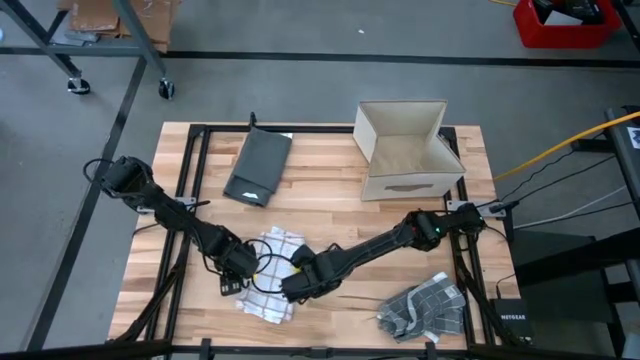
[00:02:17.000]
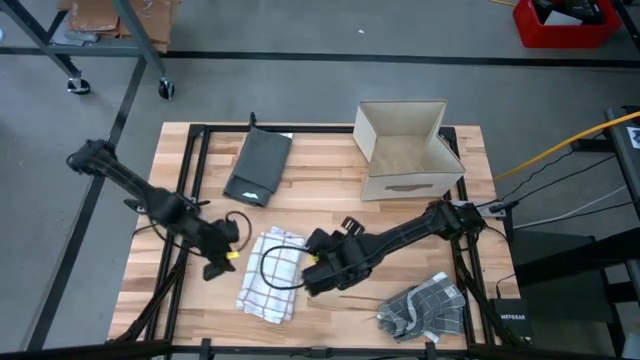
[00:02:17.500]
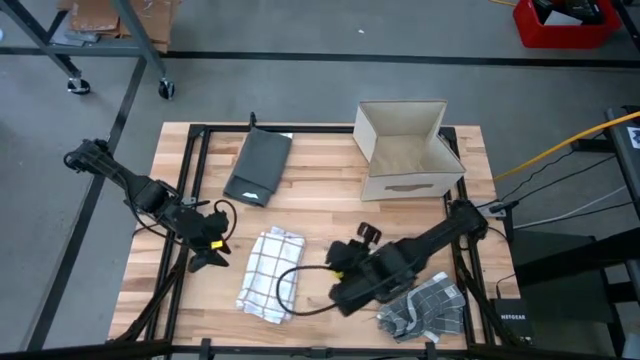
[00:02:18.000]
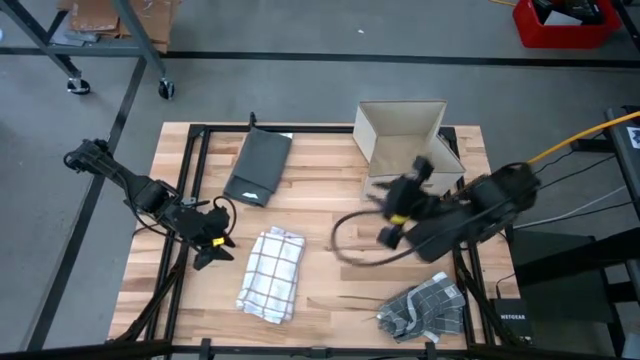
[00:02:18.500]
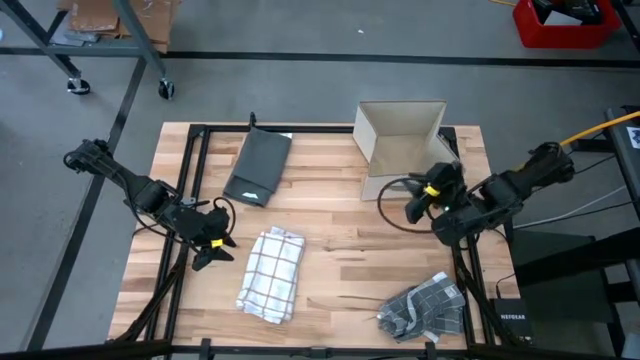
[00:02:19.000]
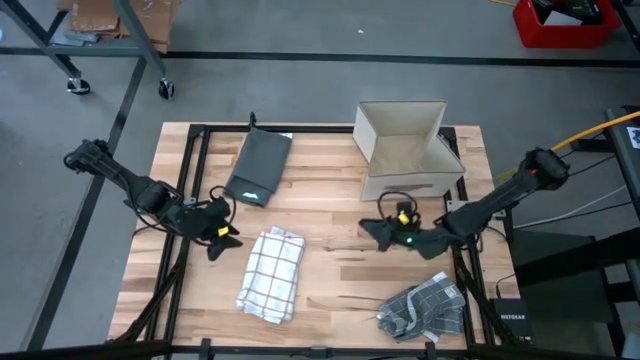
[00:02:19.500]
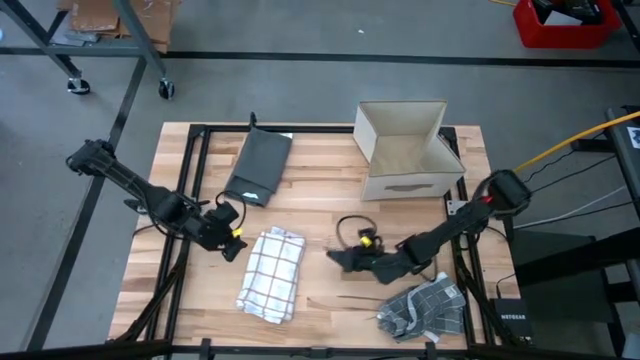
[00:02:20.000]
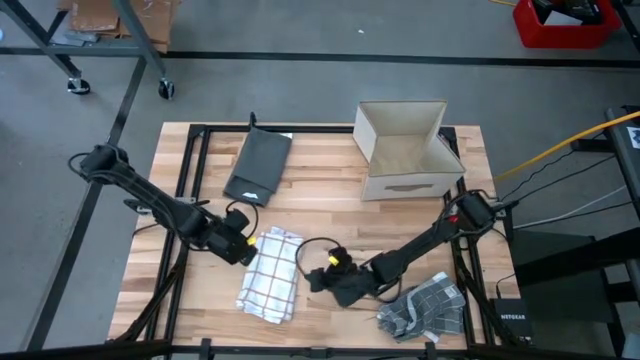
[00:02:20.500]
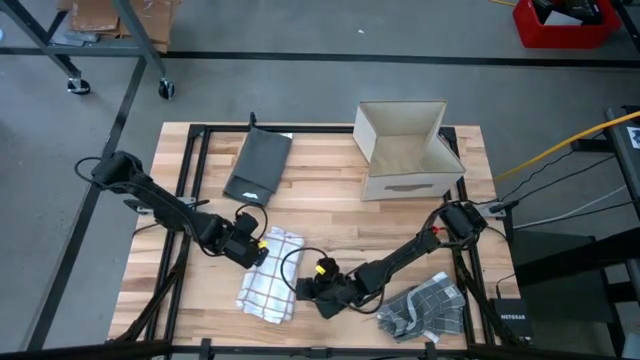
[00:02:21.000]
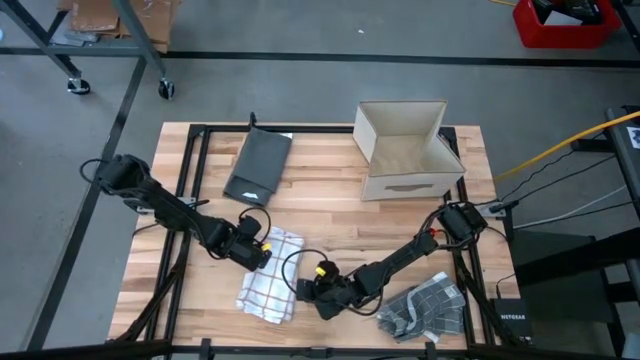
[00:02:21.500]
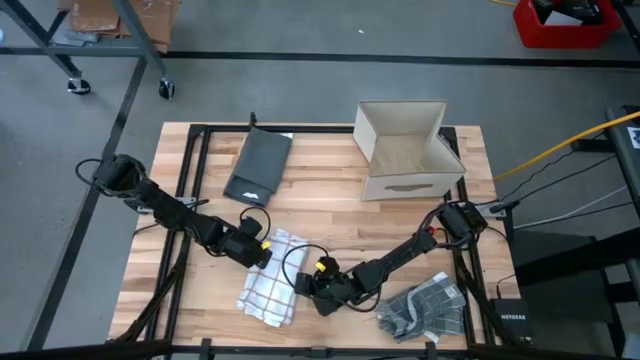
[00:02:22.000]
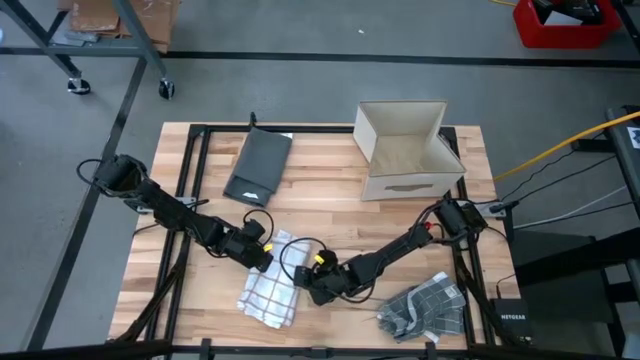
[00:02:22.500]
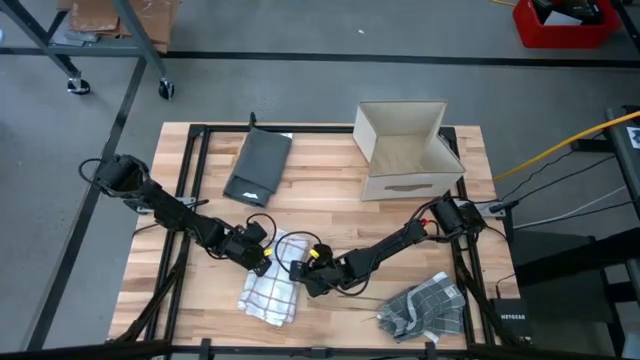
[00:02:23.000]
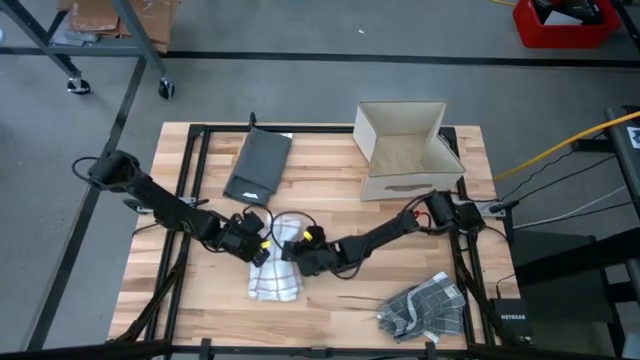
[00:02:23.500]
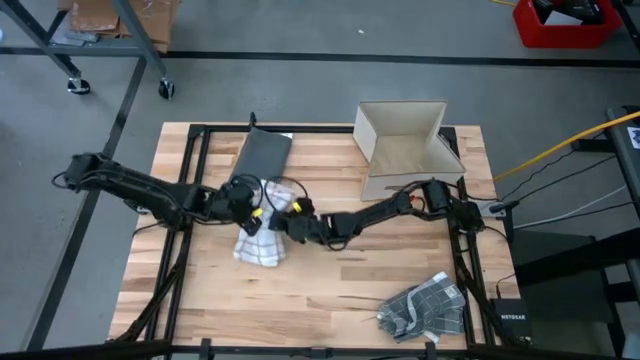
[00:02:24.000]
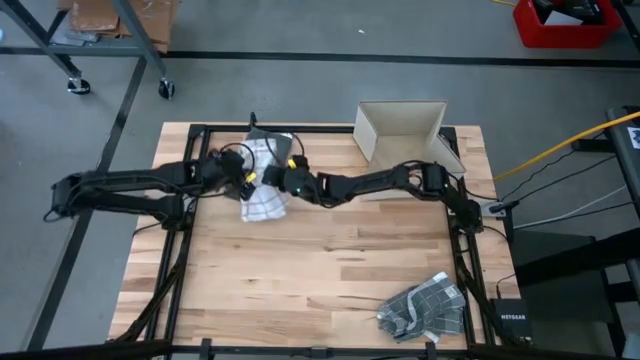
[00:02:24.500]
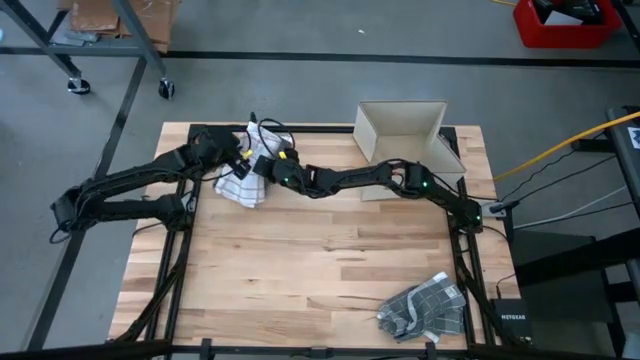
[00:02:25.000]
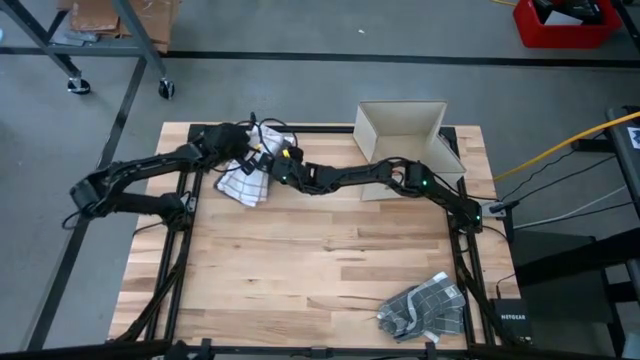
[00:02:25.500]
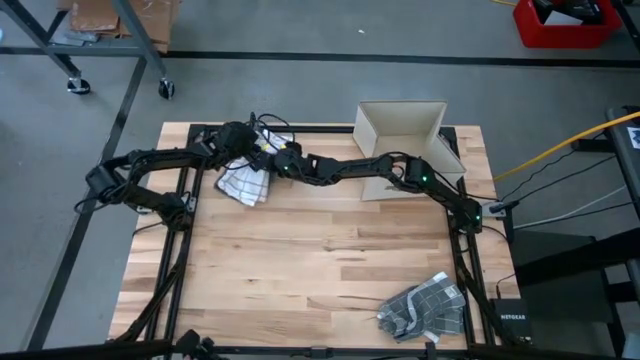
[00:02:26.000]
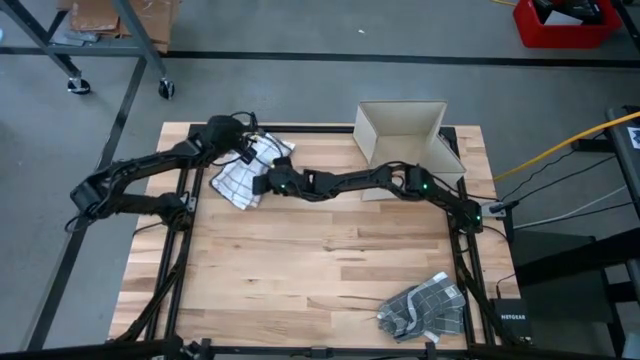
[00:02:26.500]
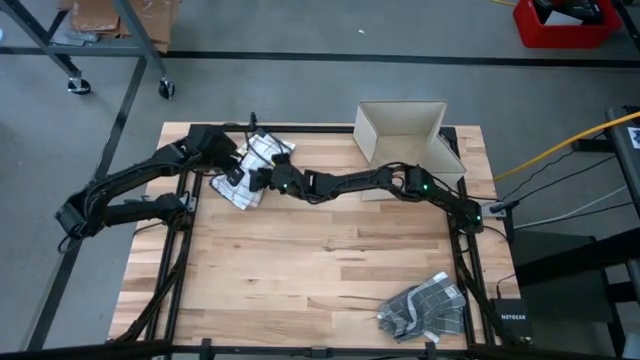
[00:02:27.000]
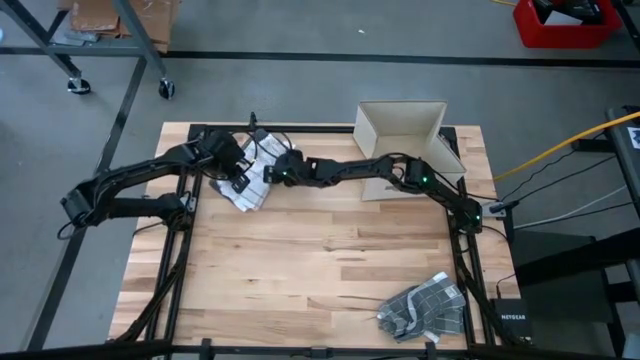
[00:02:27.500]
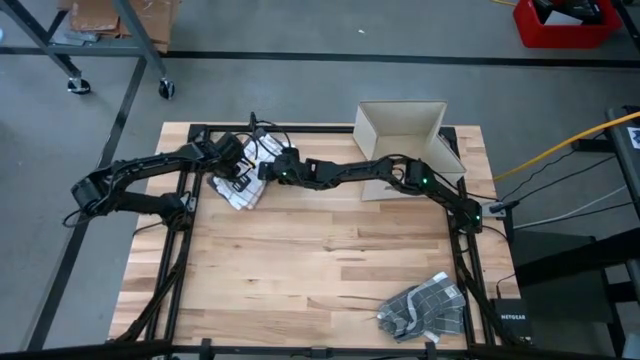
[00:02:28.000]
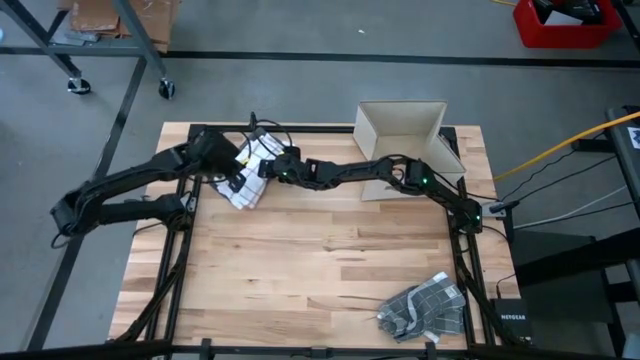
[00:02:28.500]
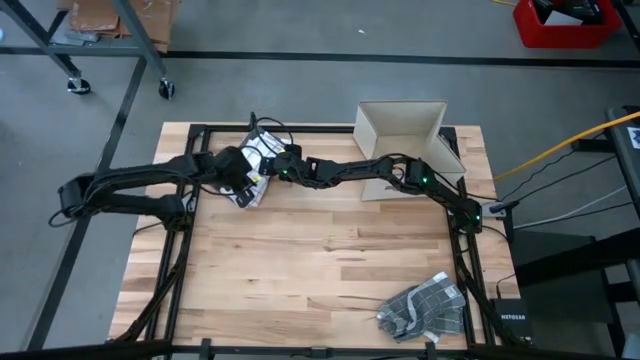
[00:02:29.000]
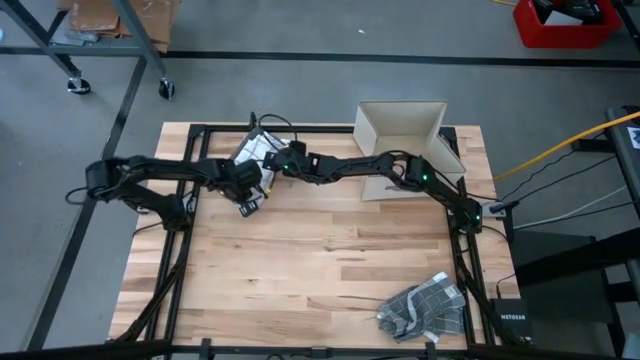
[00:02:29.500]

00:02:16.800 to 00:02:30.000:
Task: Fold towel
Stack the folded white kitchen towel on top of the folded gray kitchen towel

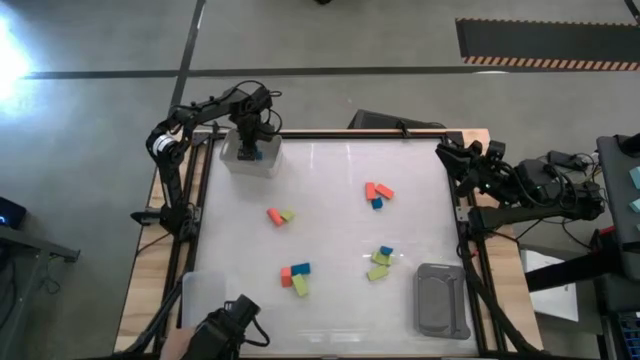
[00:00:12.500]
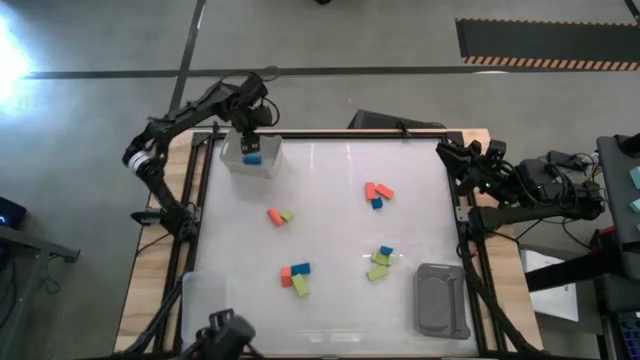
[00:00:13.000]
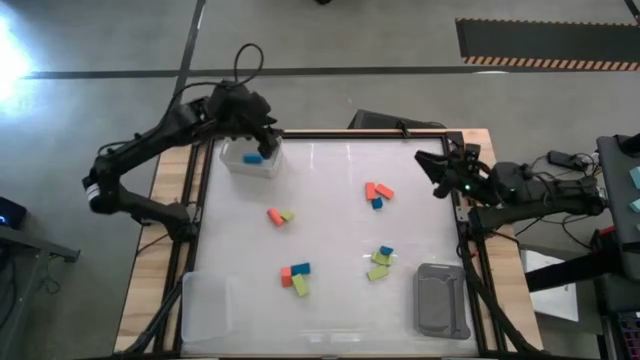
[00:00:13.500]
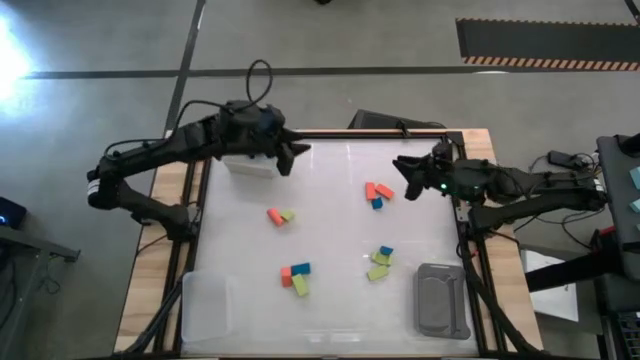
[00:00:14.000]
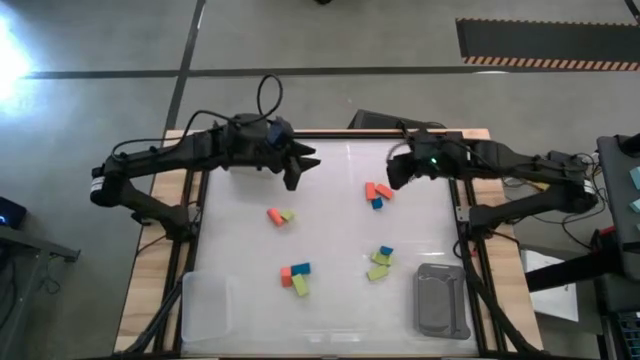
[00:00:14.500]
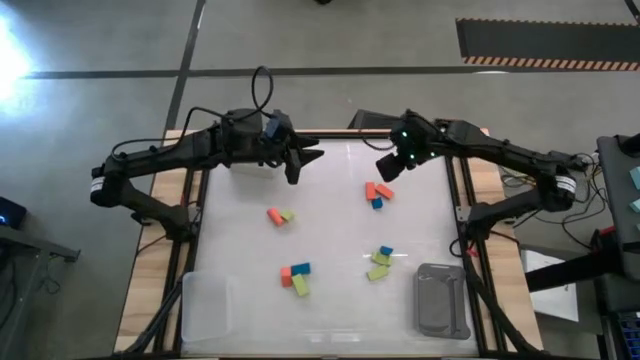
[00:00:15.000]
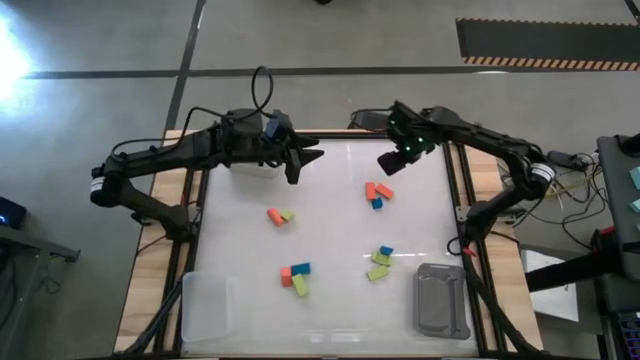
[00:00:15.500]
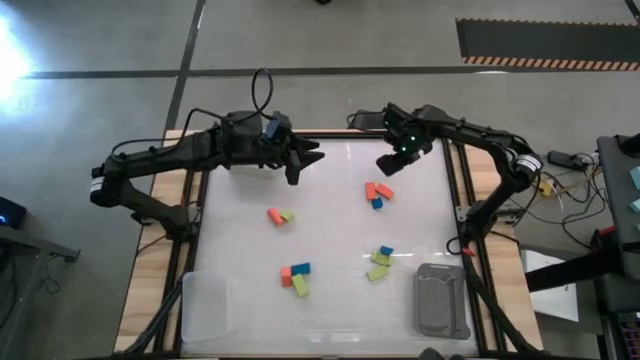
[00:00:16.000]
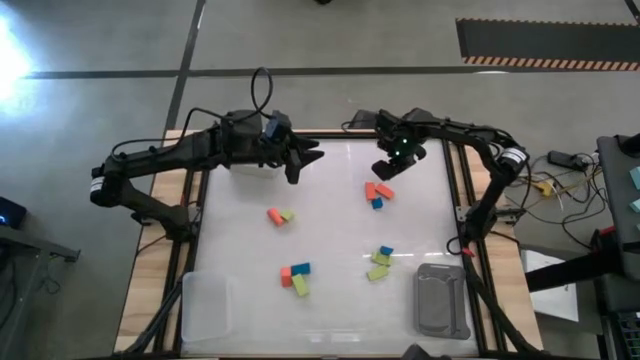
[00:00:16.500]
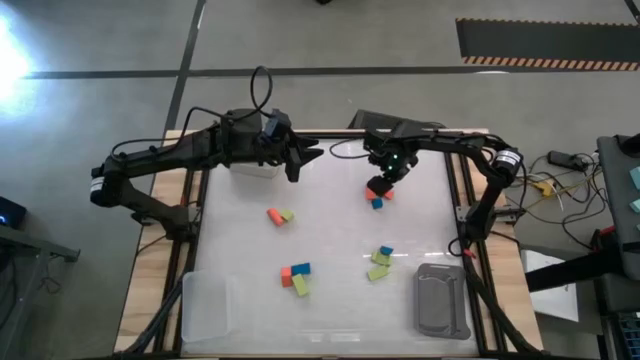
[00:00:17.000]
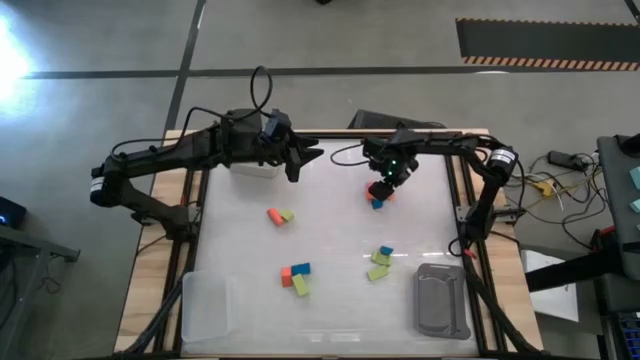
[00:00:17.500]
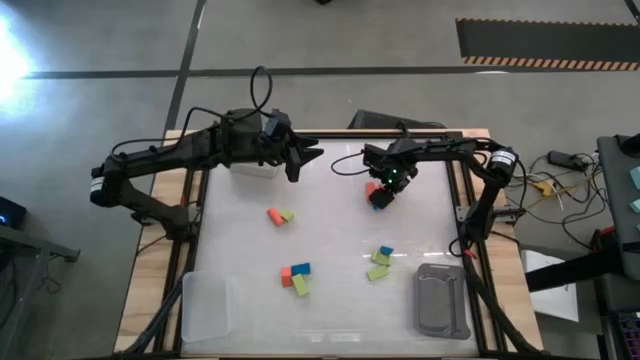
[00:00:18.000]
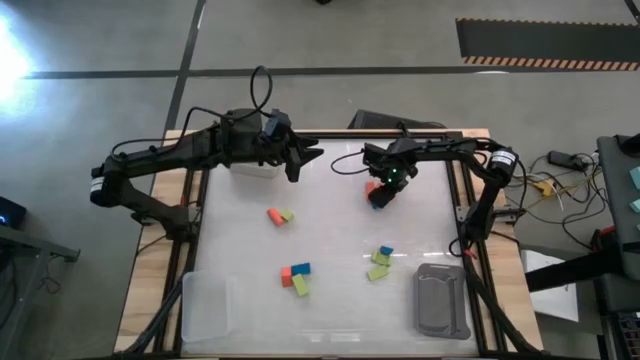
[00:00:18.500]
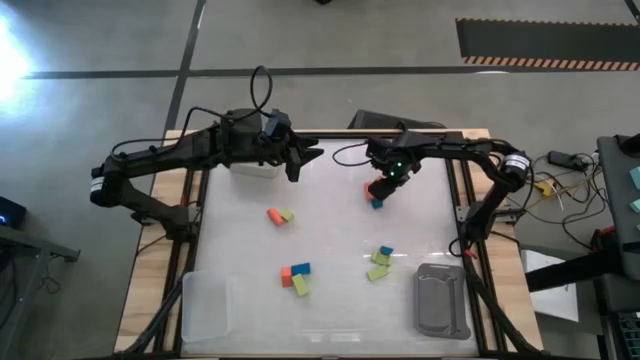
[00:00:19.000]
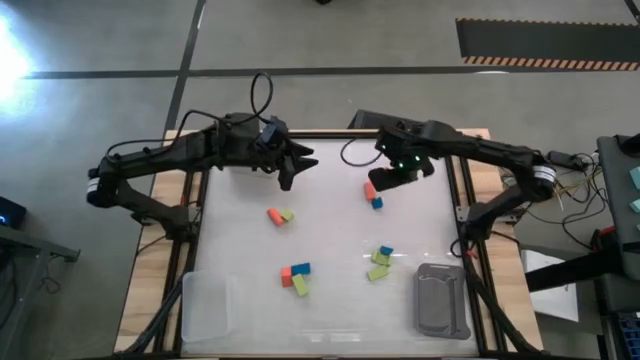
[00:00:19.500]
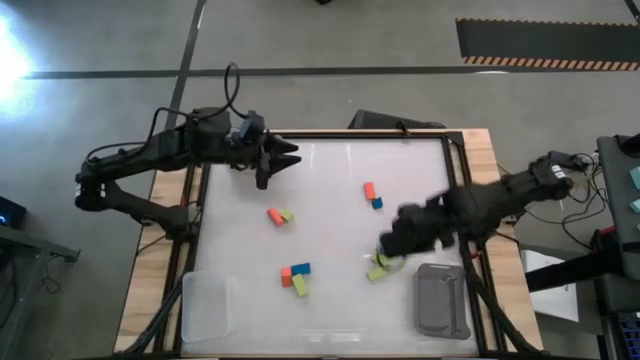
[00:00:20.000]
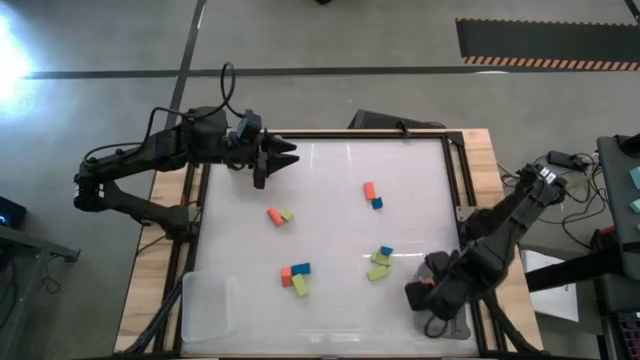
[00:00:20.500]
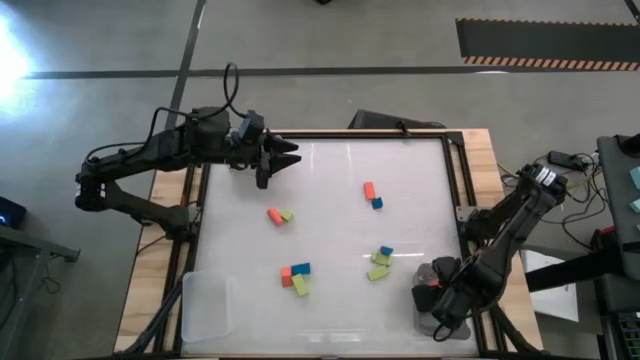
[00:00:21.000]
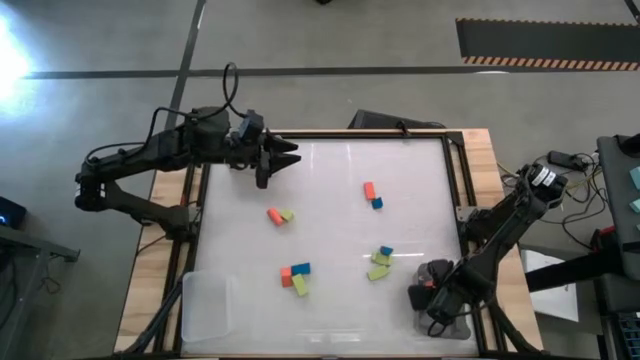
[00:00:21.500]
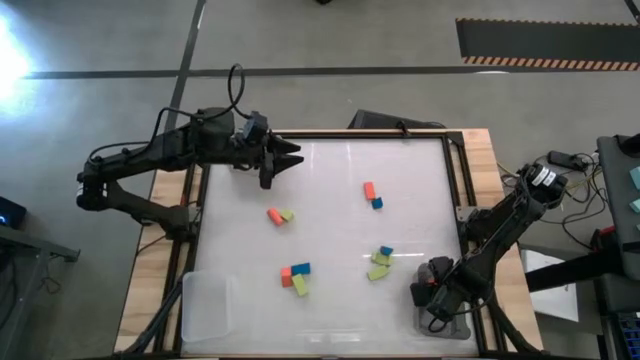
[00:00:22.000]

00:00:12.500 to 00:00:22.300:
Task: Sort & place blocks by color
Put the orange block into the black bin
